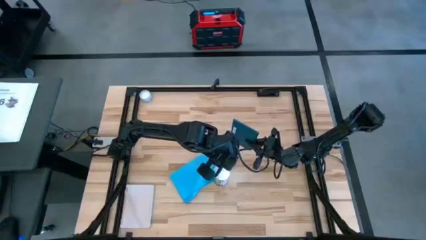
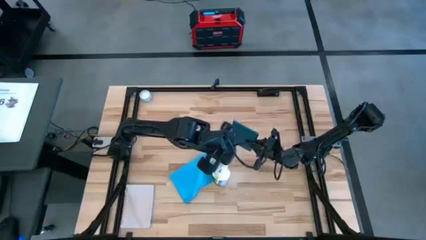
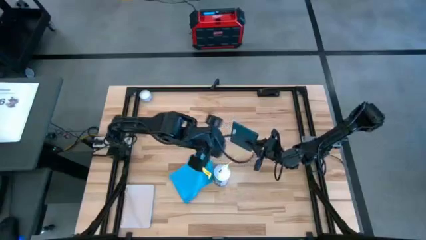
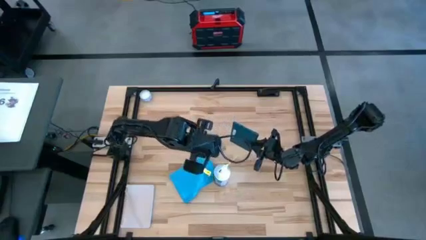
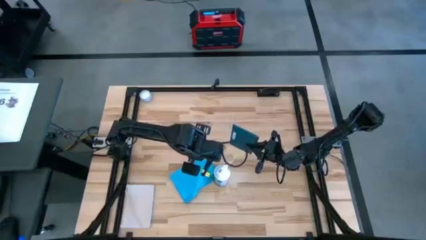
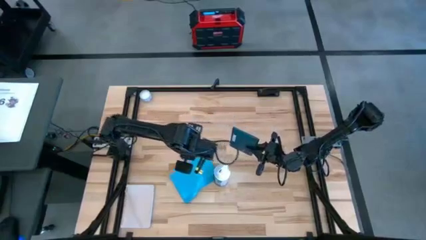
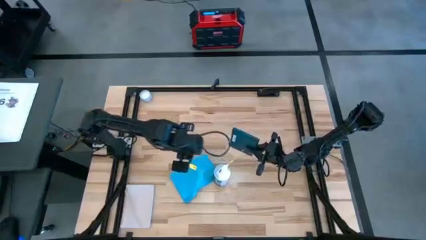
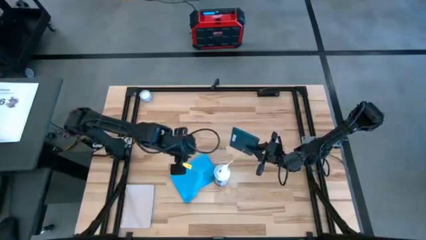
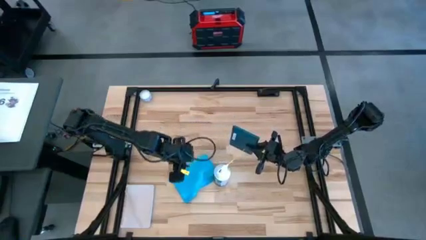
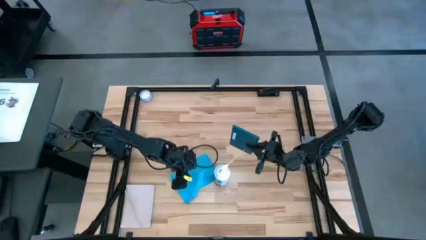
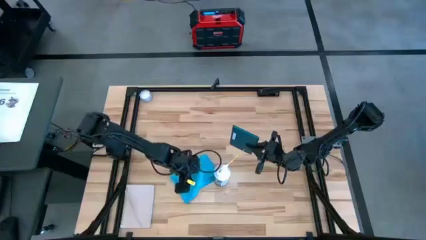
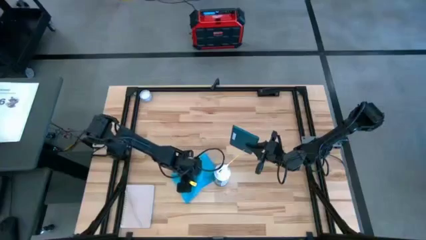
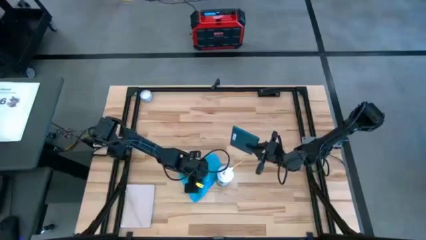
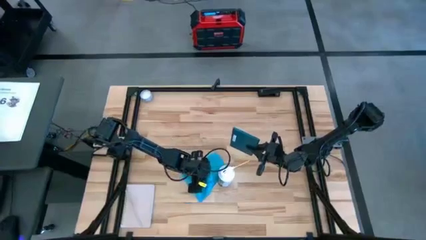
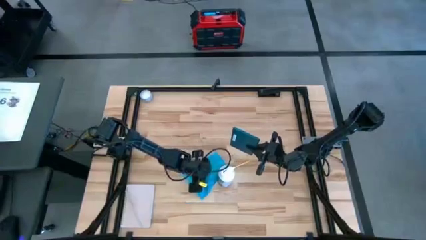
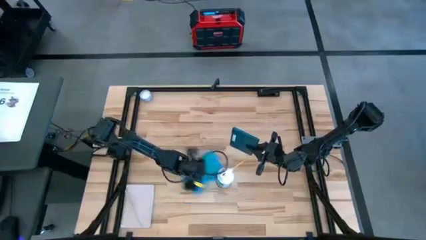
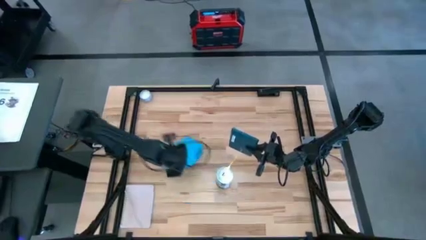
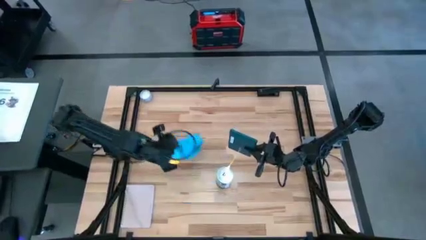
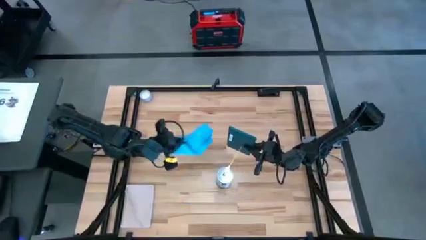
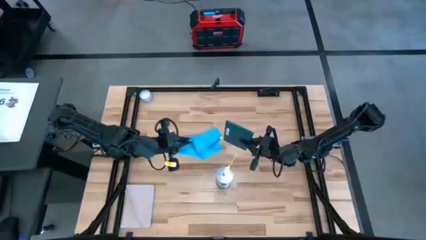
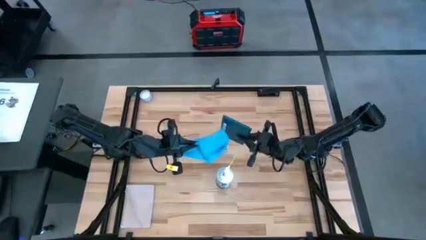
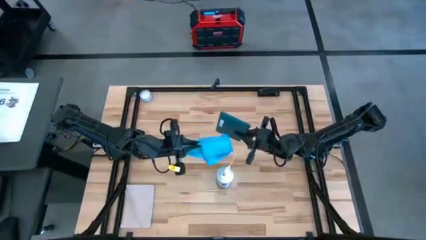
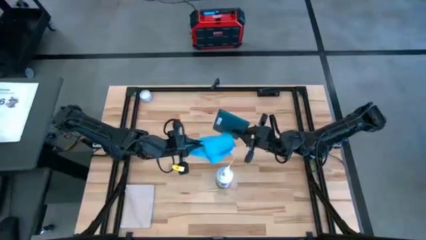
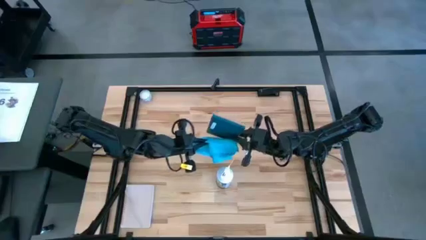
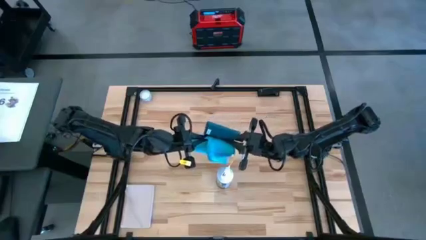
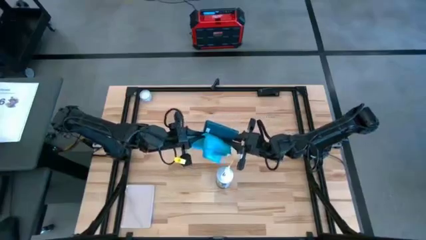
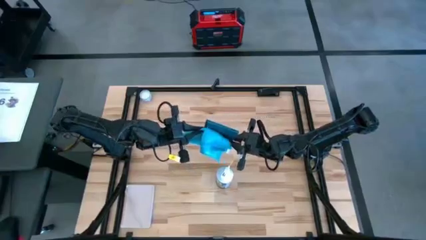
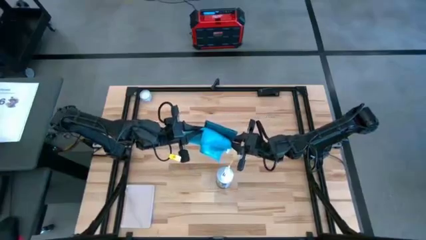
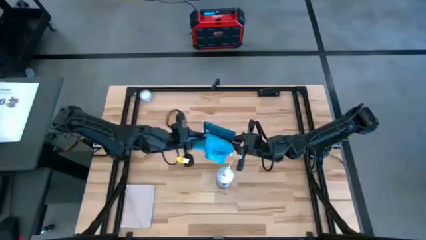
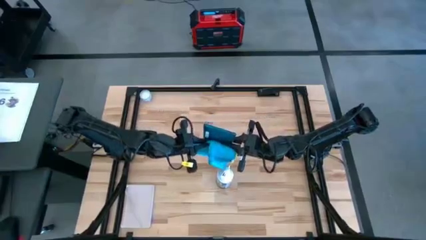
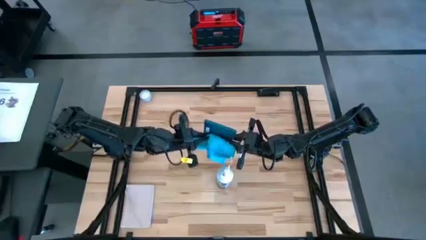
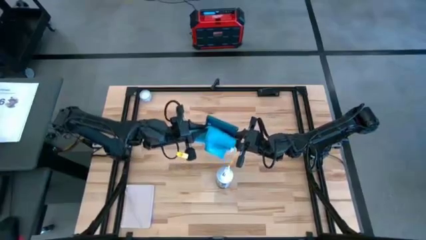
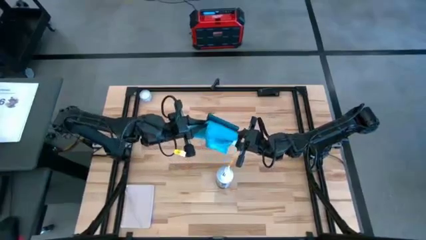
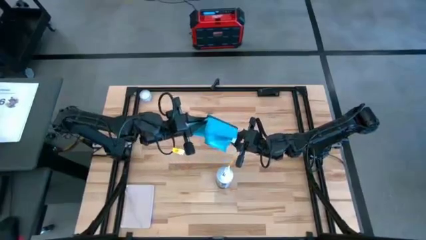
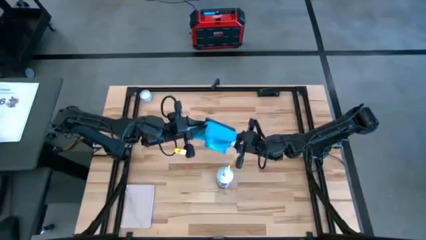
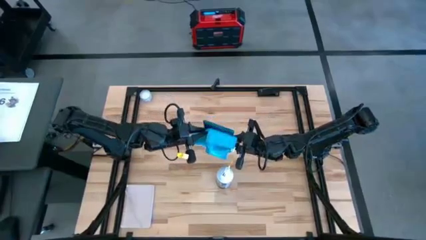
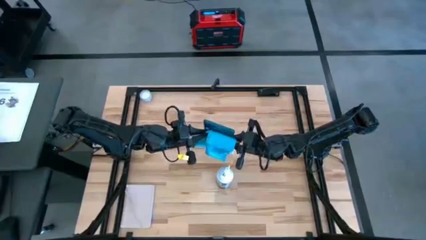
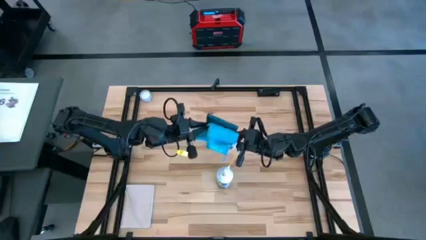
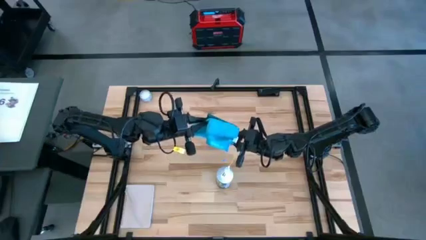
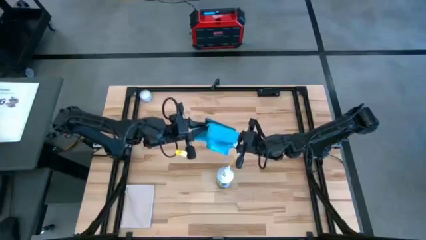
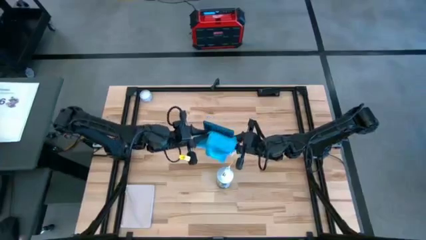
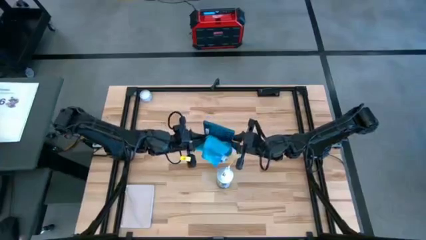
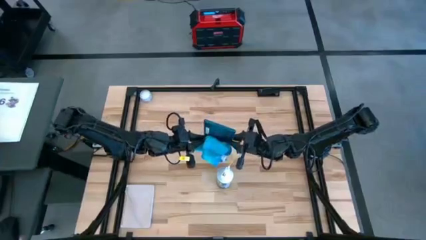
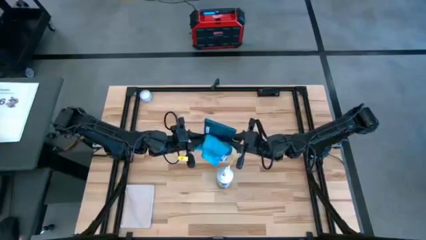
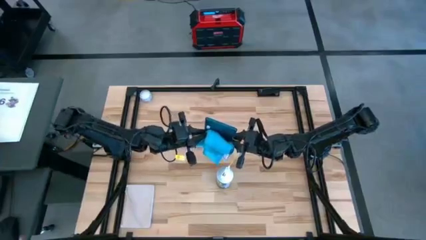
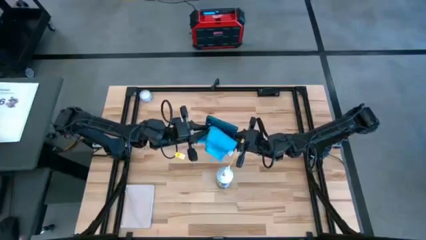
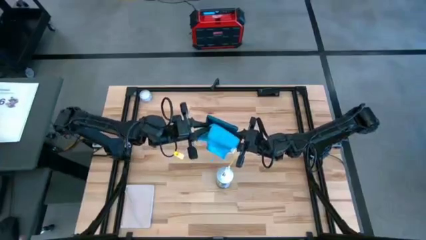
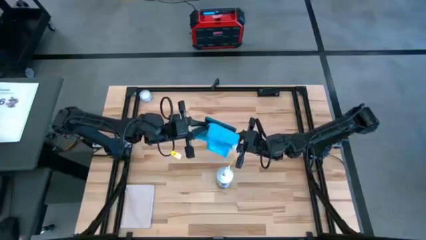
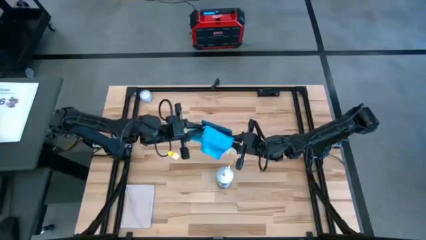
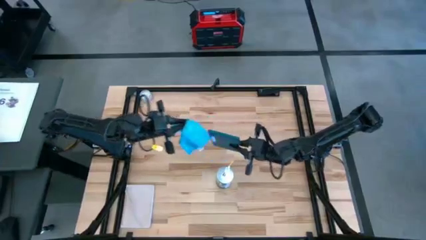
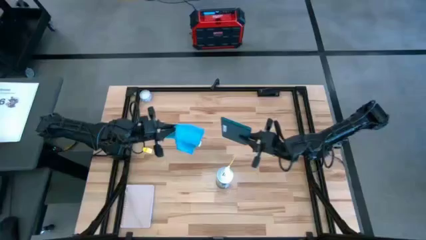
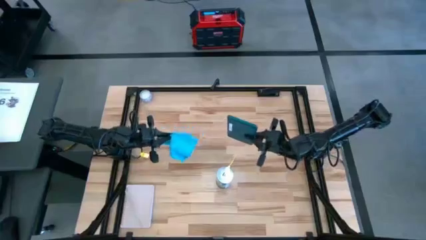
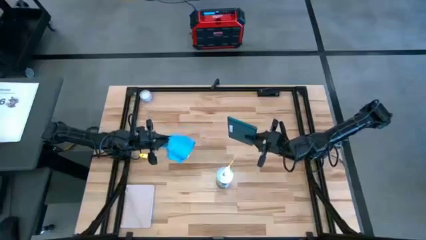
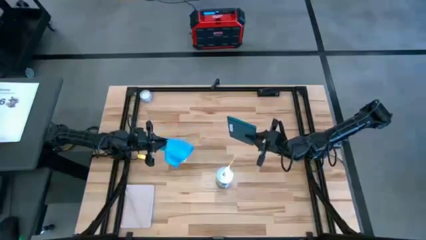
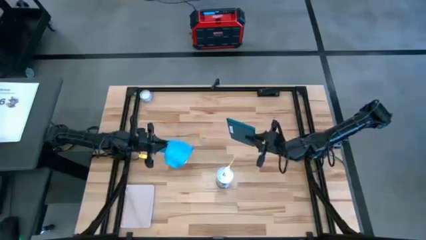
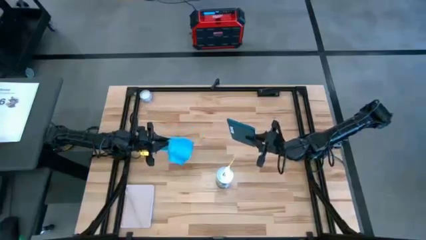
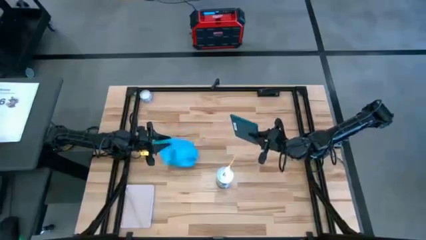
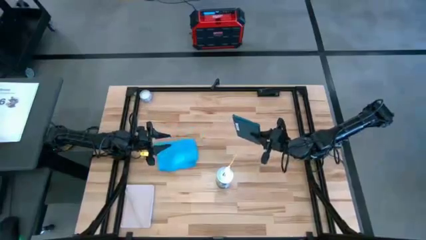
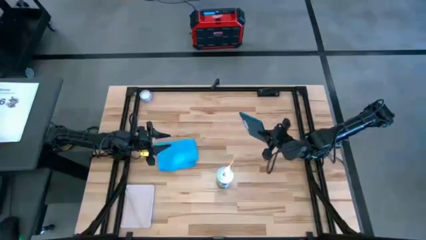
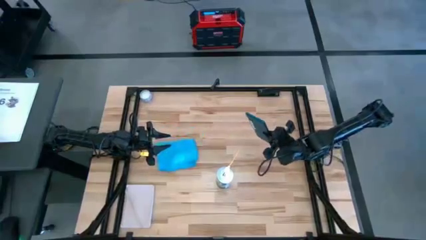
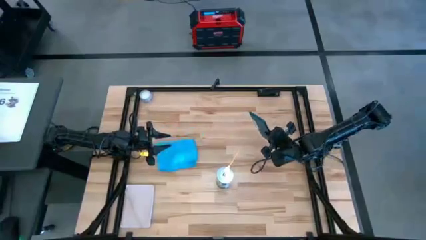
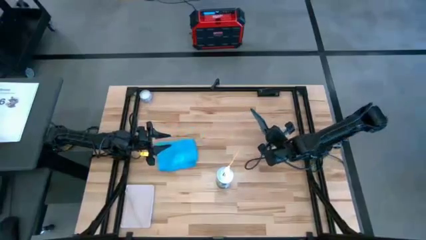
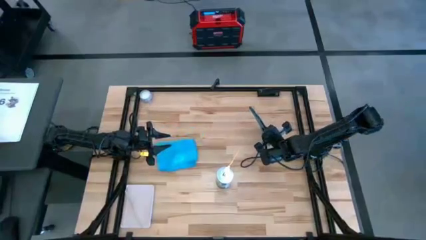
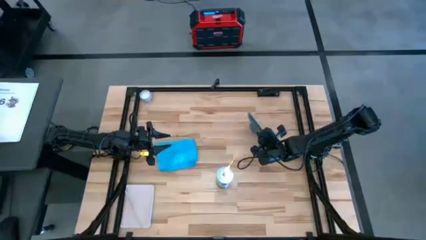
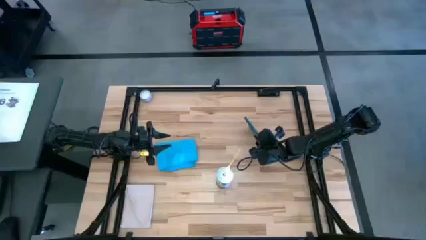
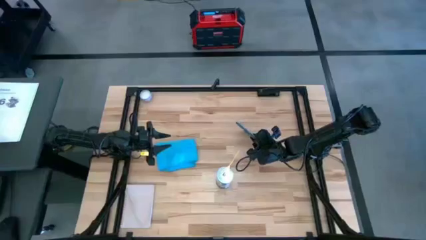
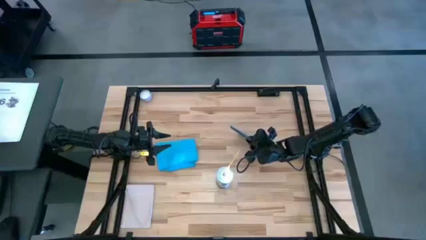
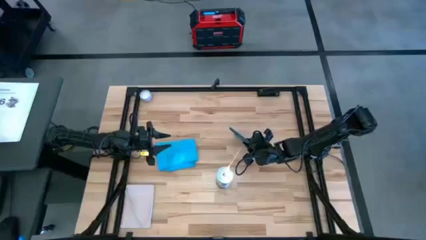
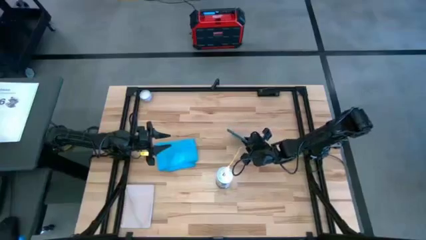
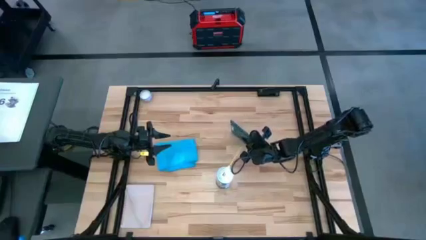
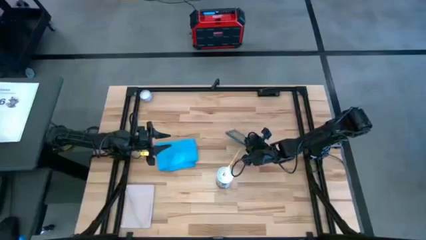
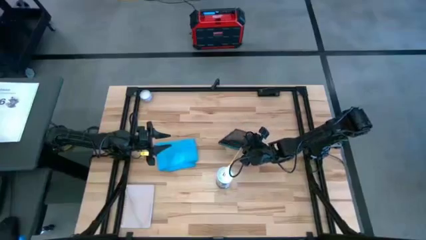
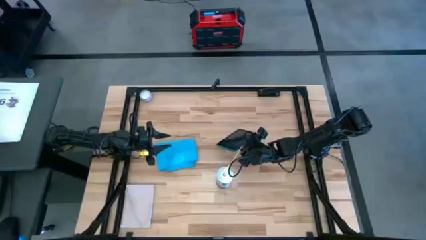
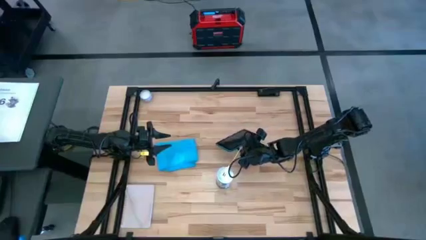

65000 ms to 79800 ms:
Task: Apply microfiber cloth
Wipe the back of the blue tablet with the blue microfiber cloth

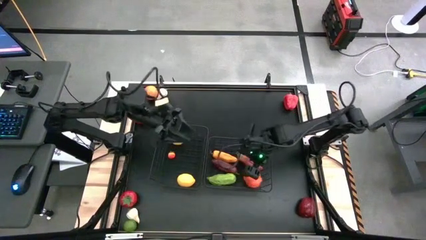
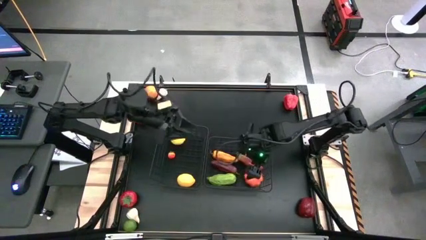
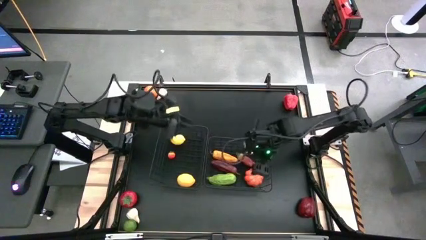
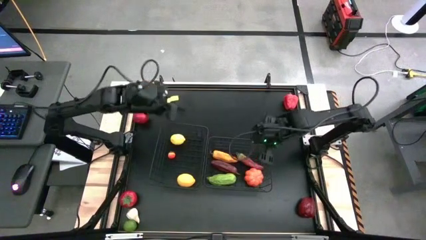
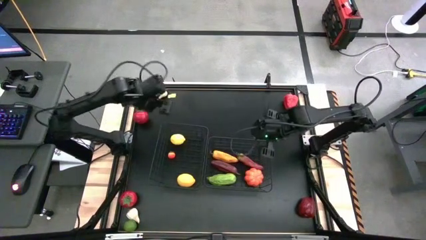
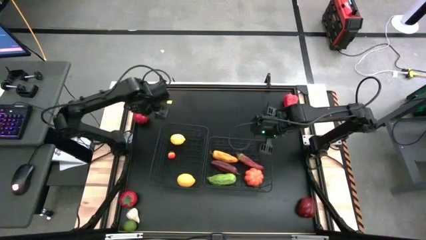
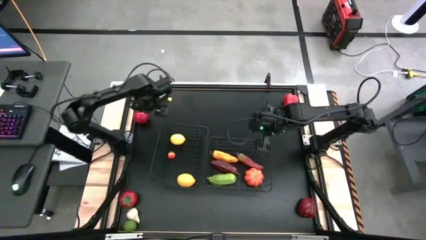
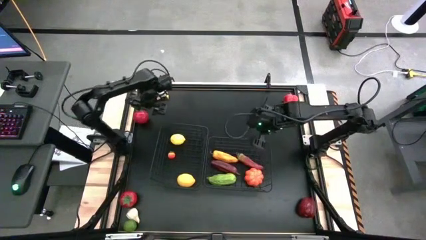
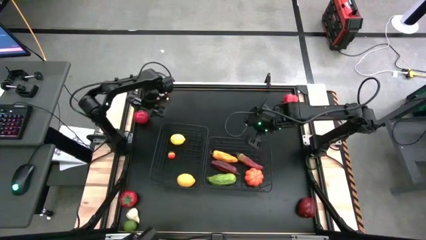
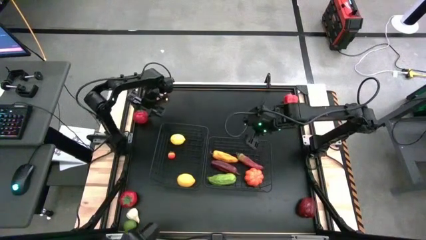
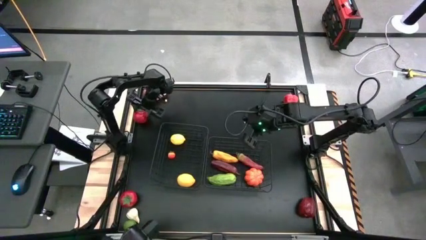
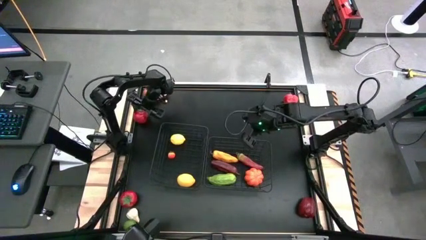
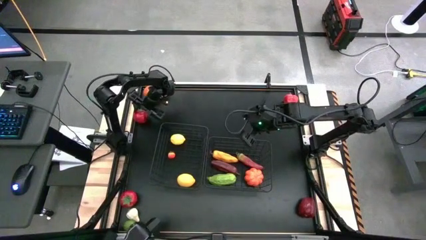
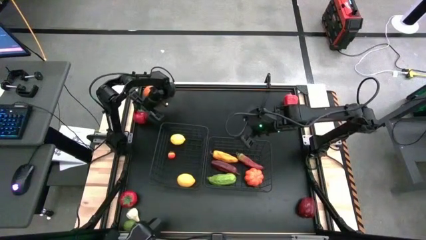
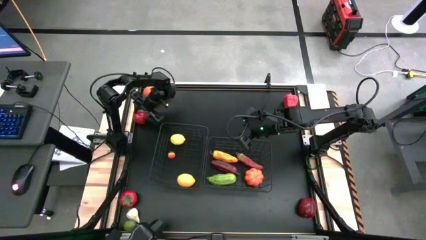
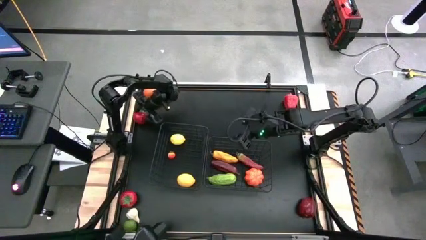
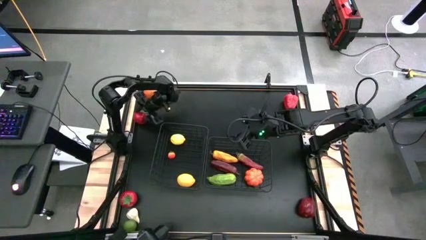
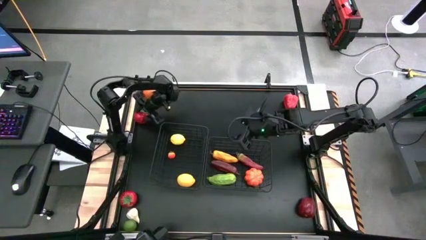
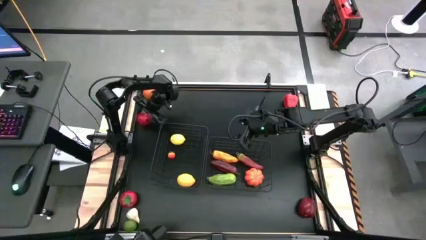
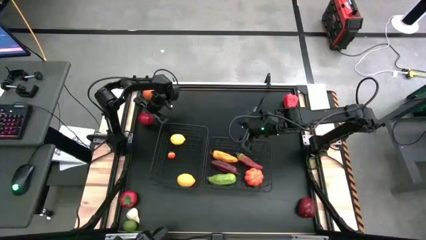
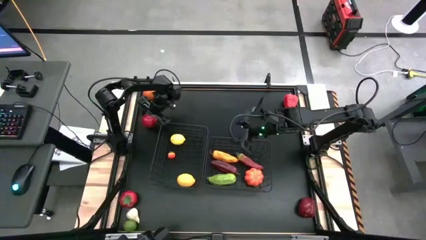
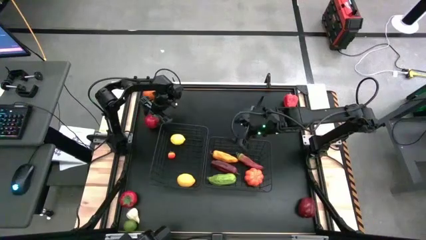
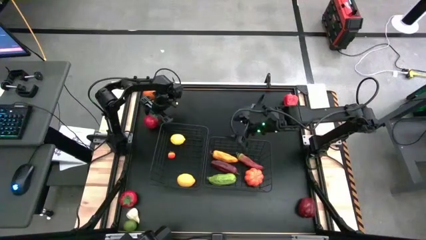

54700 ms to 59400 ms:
Task: Sort produce into baskets
Put the top red tomato into the left wire basket
